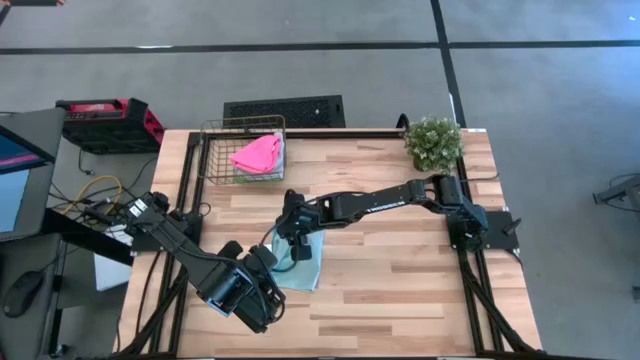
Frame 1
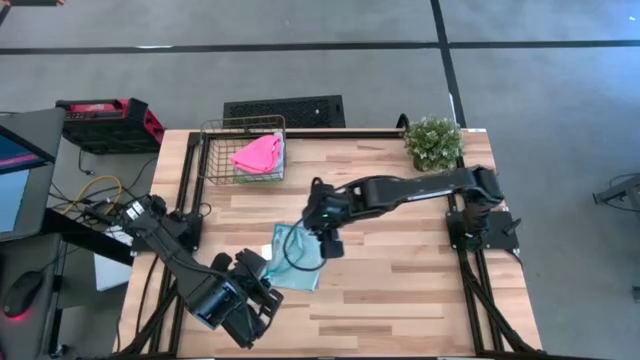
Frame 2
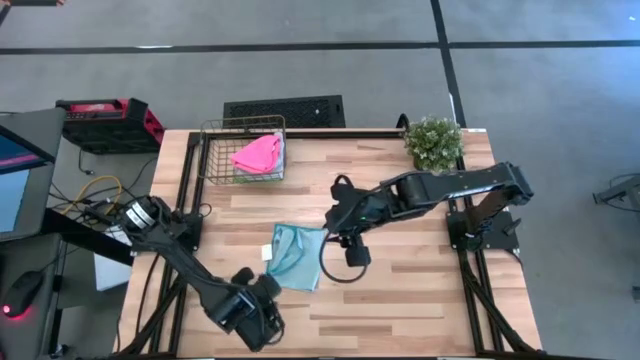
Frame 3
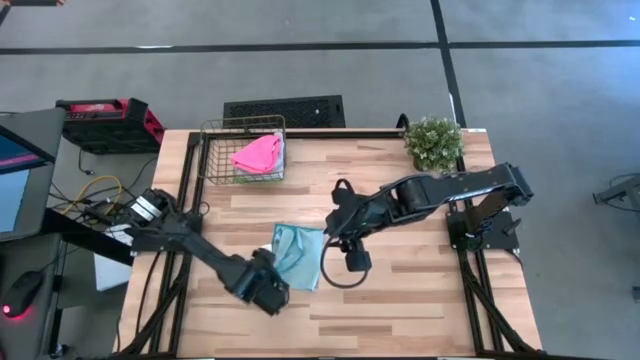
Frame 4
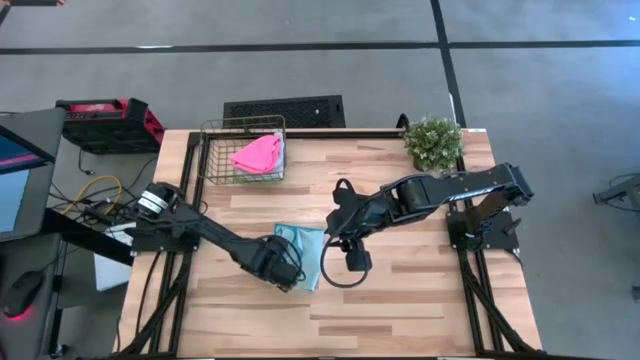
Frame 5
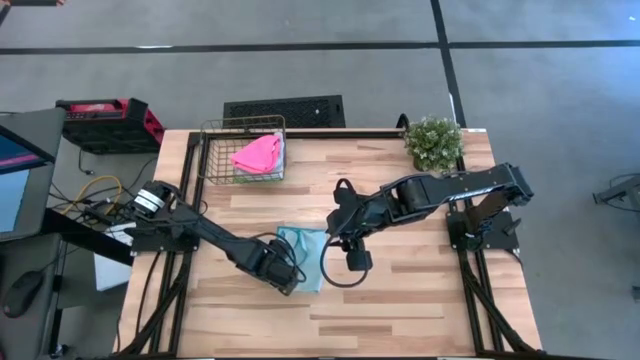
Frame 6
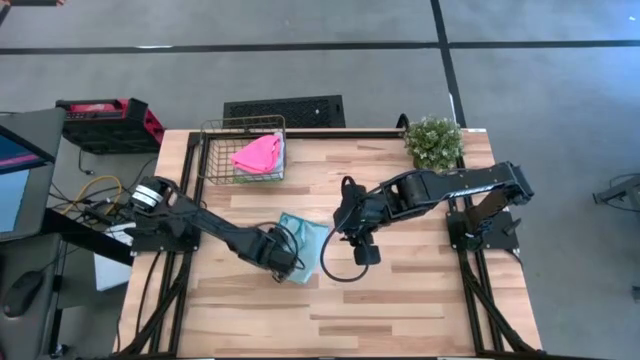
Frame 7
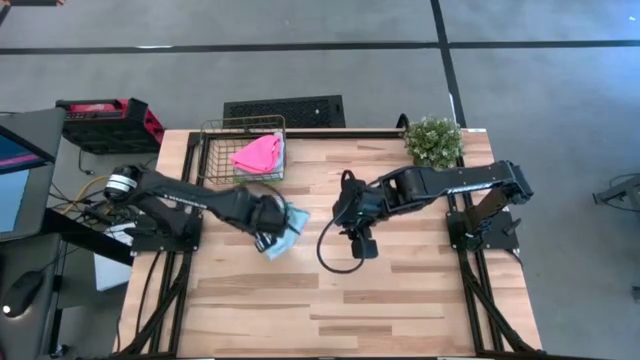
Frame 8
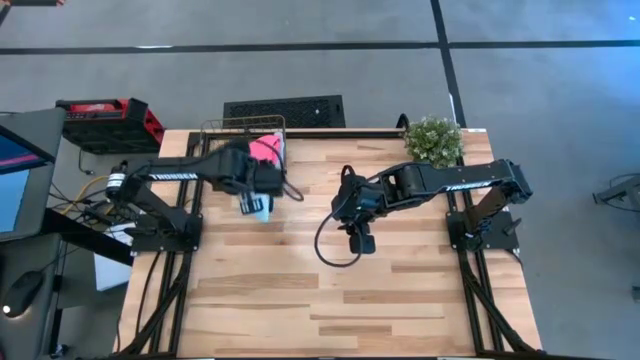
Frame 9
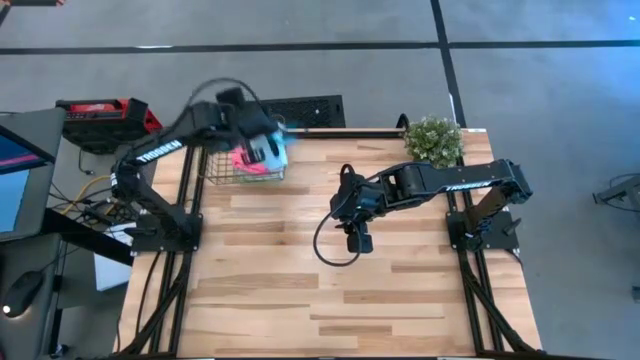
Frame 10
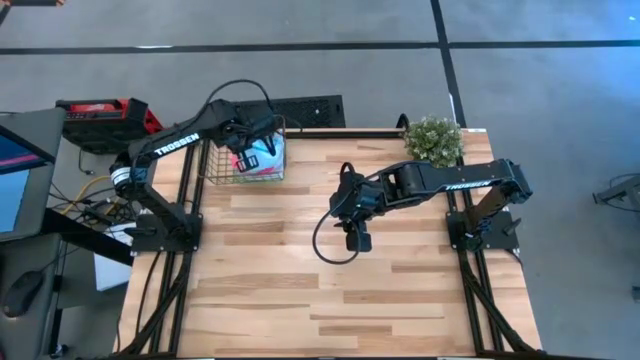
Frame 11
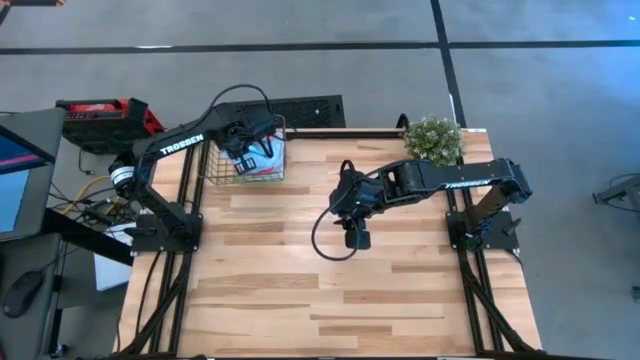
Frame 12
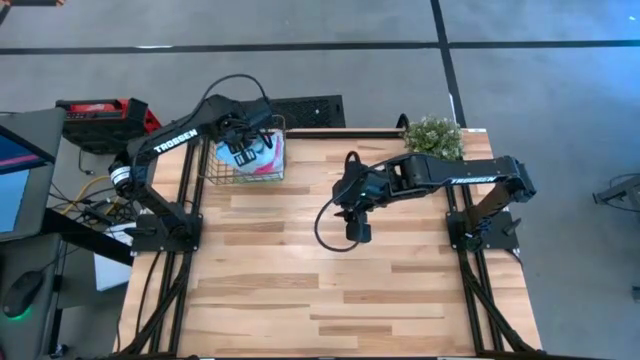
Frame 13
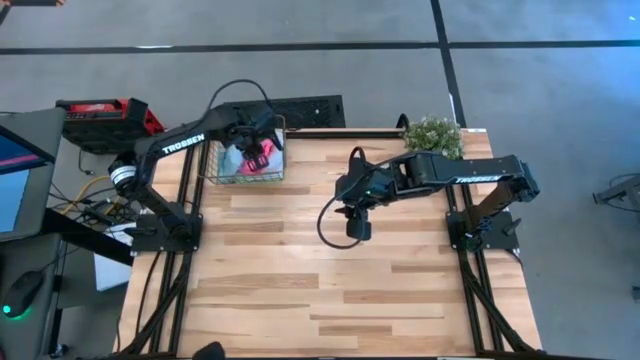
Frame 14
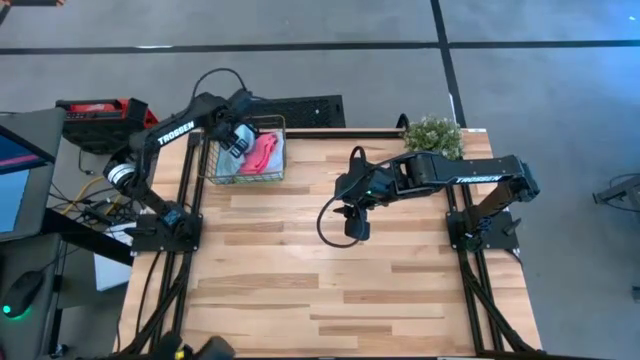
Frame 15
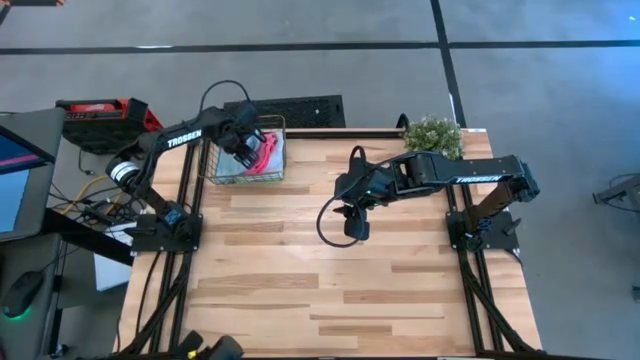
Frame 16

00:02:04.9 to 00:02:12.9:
Task: Fold microfiber towels
Put the blue microfiber cloth into the gold wire basket

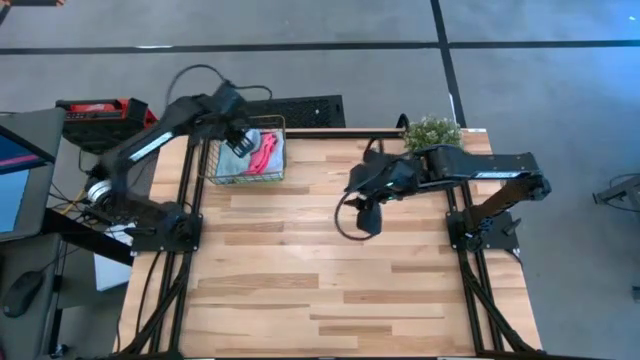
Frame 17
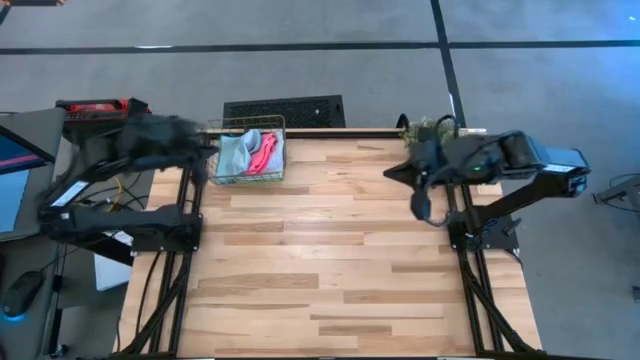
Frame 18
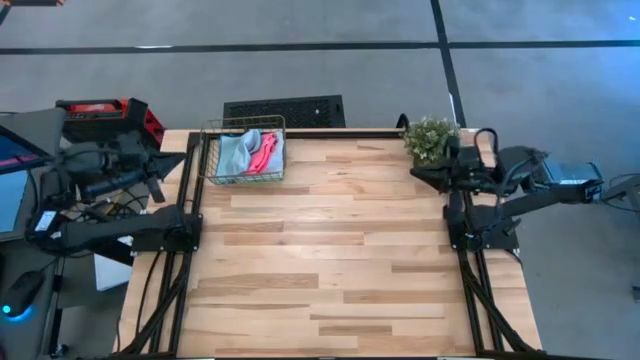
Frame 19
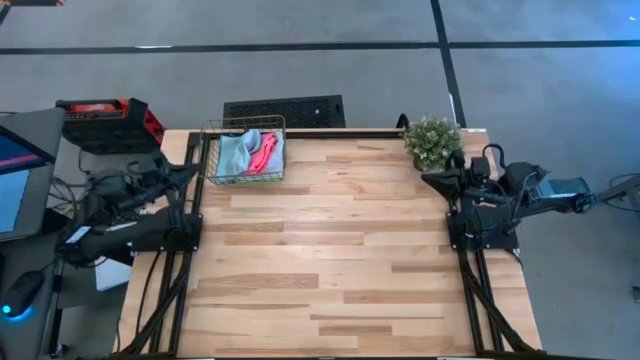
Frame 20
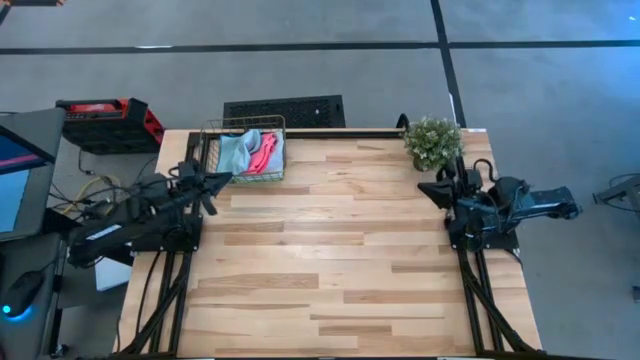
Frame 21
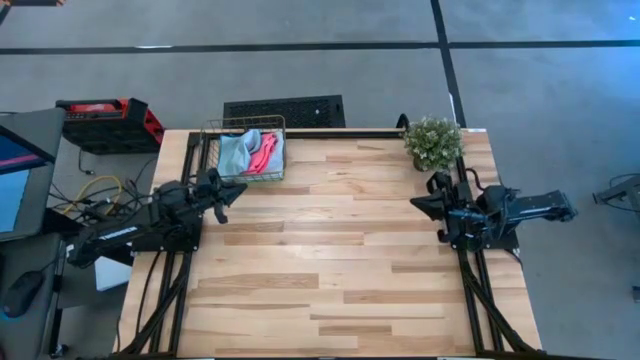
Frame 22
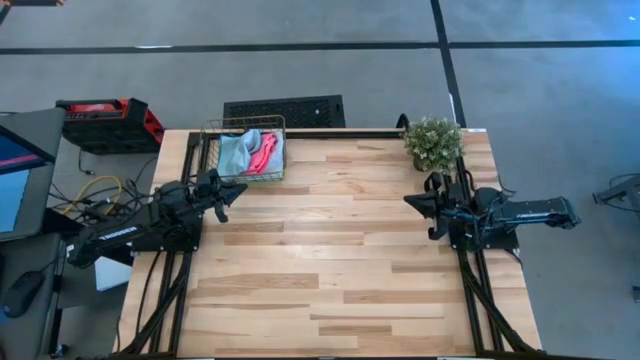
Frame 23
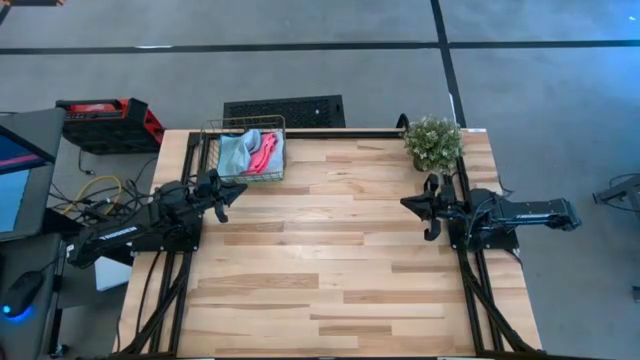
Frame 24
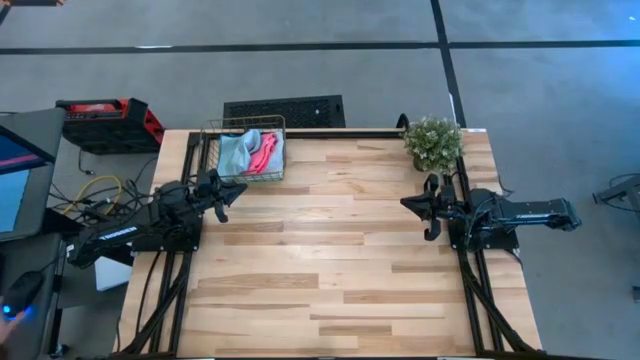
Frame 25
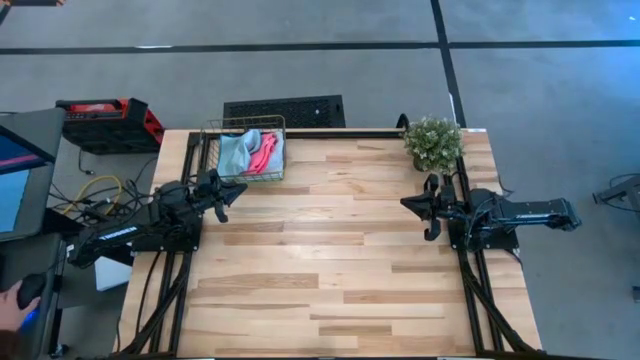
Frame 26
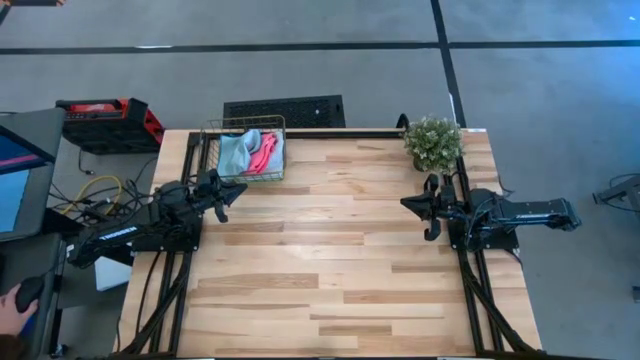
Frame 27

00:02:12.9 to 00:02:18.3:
Return to Home Position

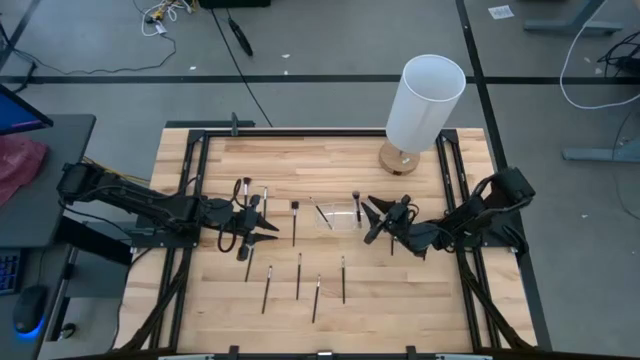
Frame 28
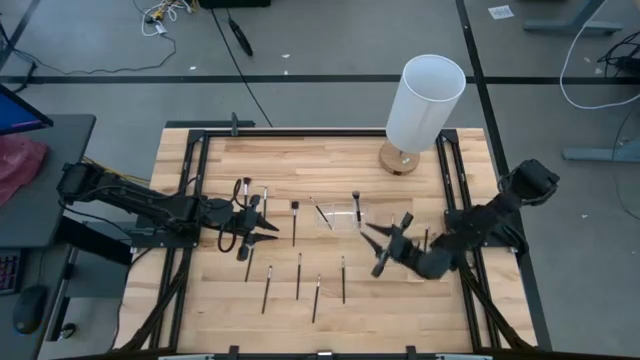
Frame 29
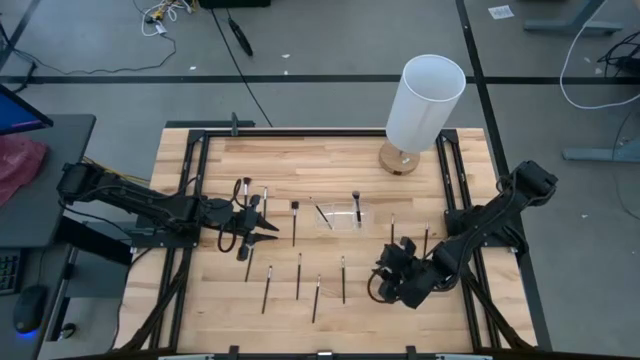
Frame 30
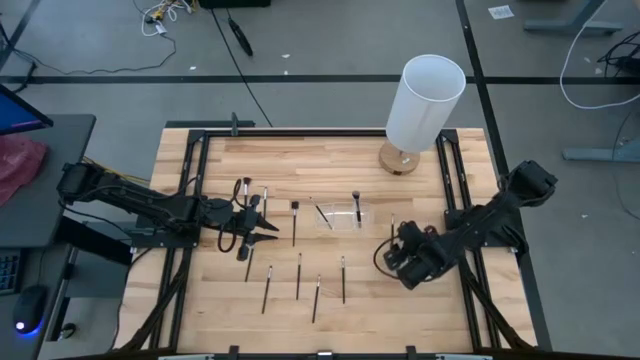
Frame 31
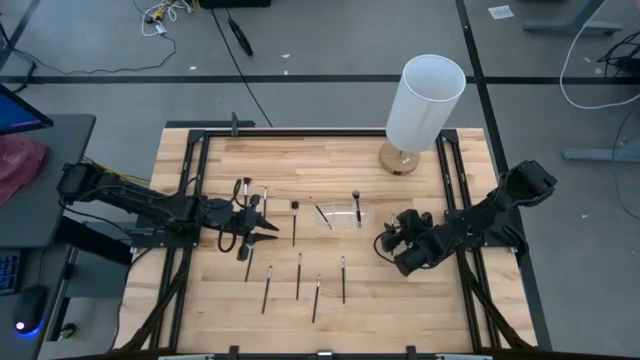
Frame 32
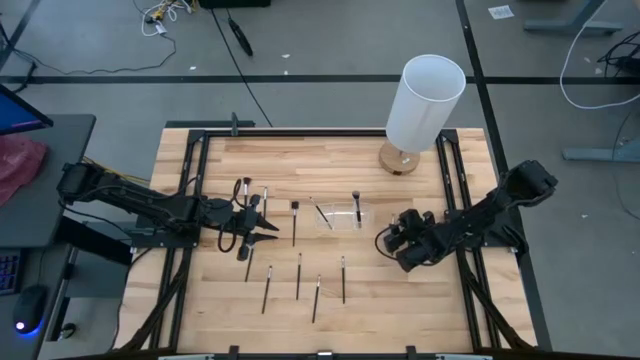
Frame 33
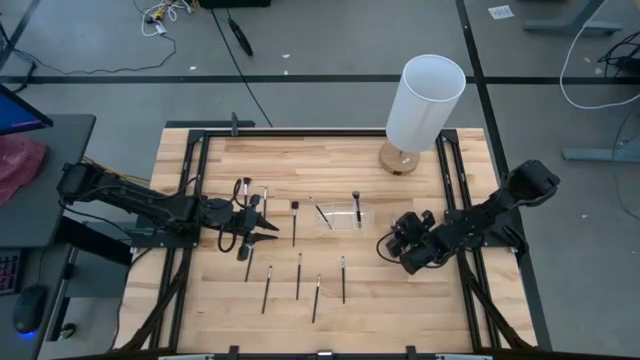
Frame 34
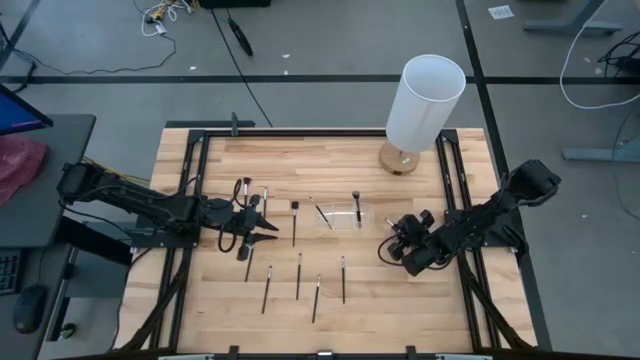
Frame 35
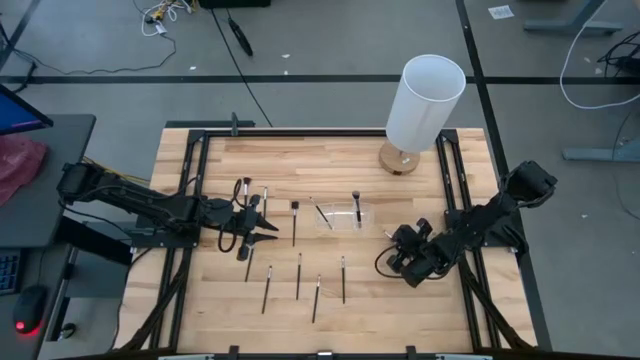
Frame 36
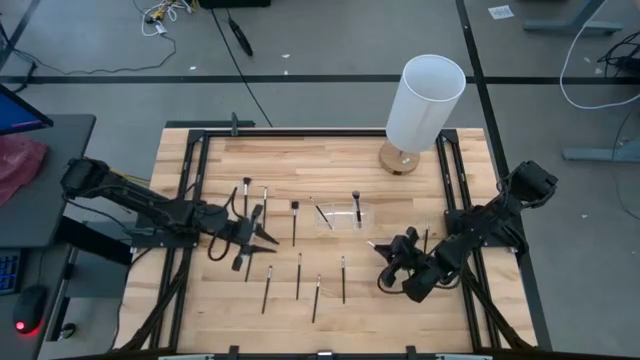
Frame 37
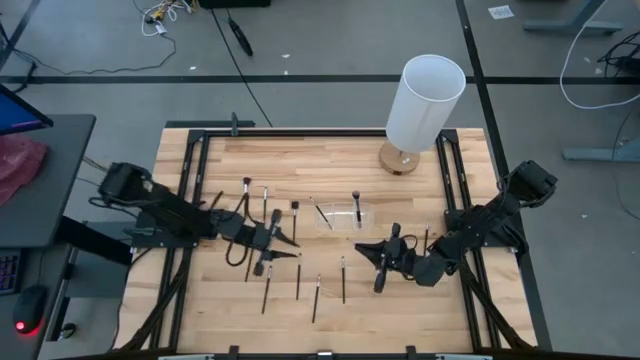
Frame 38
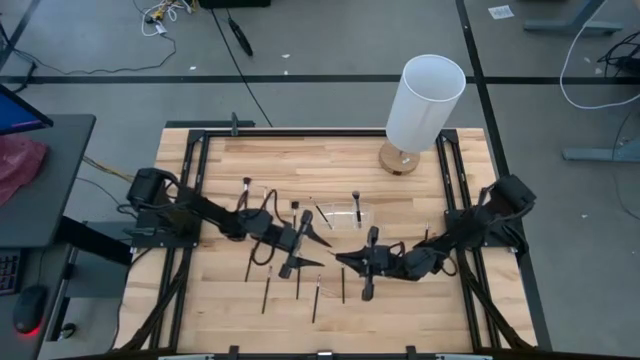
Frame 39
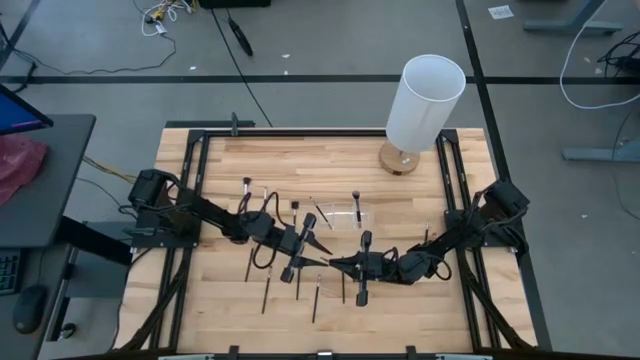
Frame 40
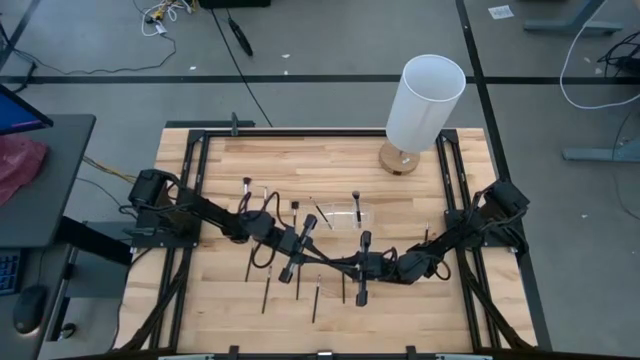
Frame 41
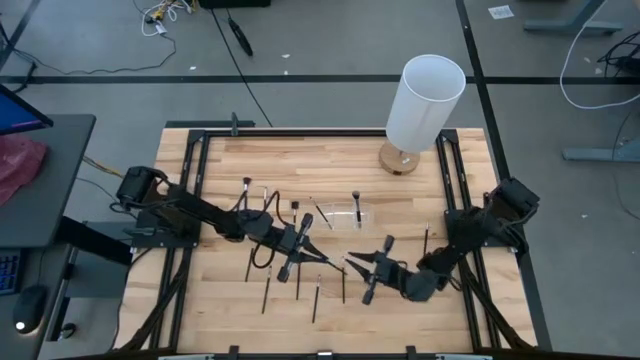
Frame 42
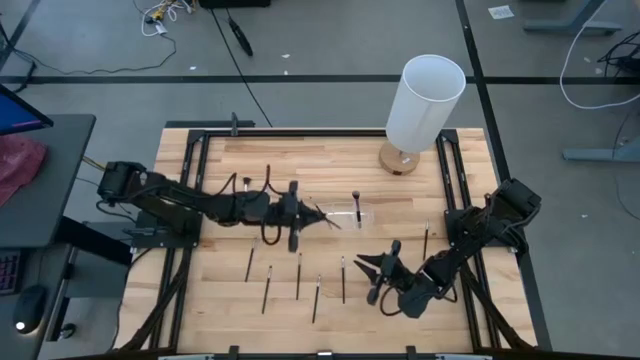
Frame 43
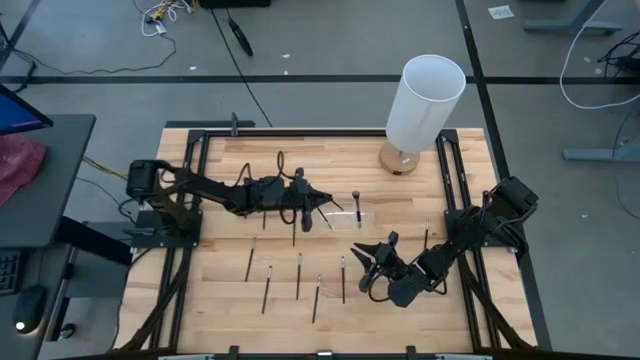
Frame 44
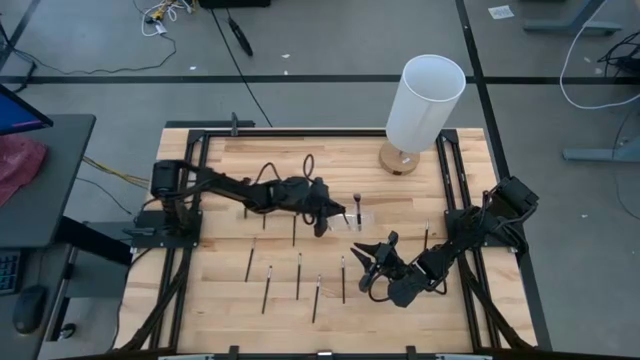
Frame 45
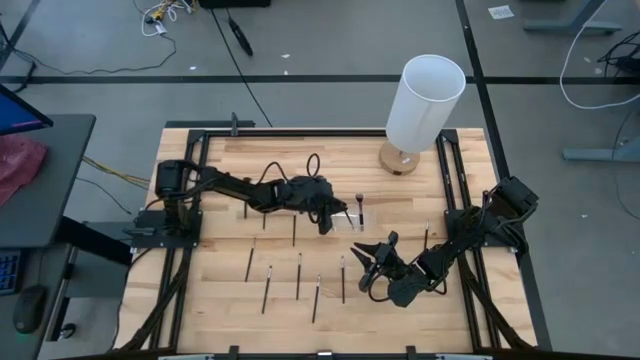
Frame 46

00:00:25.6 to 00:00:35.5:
Task: Pick & Place Makeup Supplies
Put the black makeup brush into the transparent organizer
